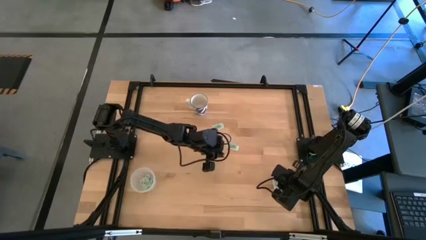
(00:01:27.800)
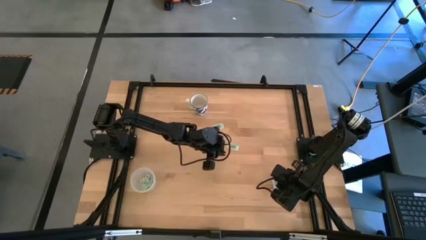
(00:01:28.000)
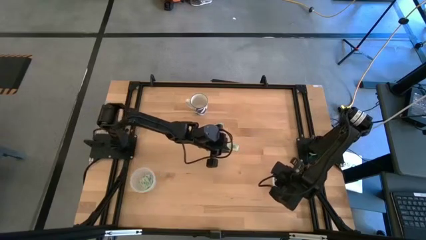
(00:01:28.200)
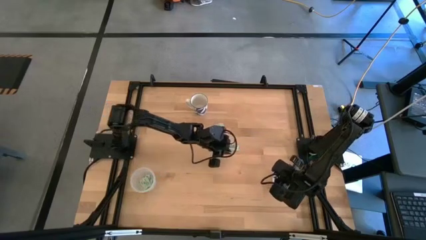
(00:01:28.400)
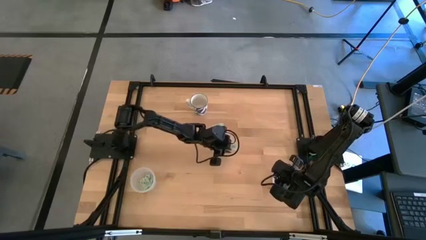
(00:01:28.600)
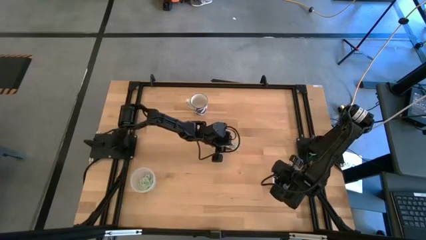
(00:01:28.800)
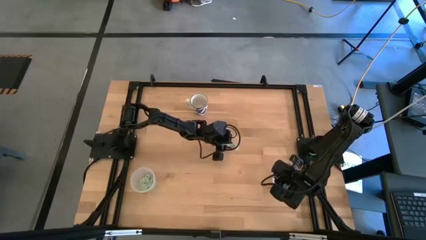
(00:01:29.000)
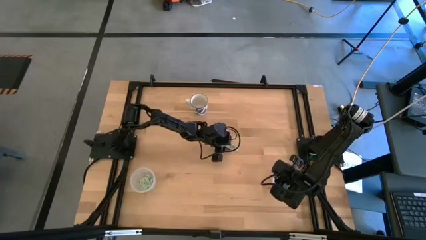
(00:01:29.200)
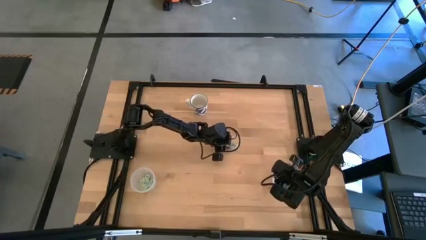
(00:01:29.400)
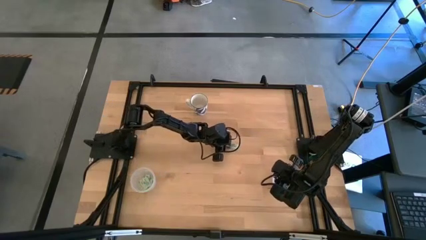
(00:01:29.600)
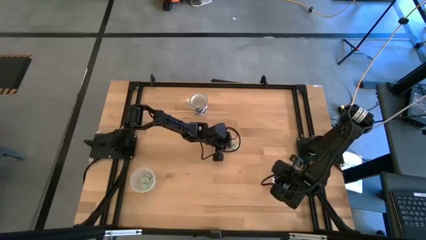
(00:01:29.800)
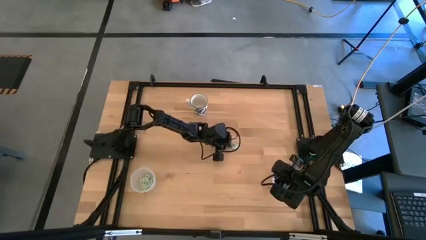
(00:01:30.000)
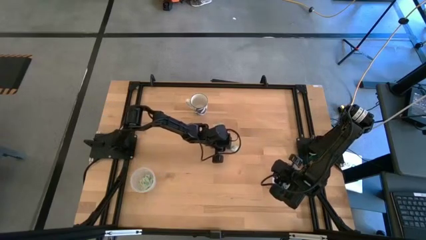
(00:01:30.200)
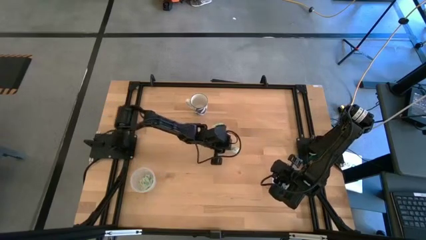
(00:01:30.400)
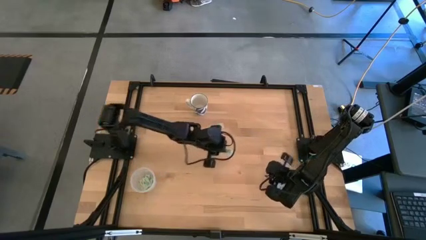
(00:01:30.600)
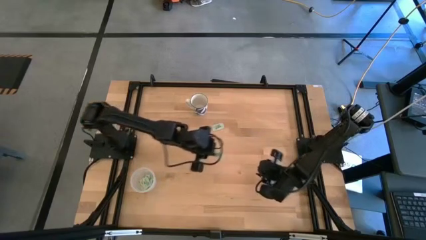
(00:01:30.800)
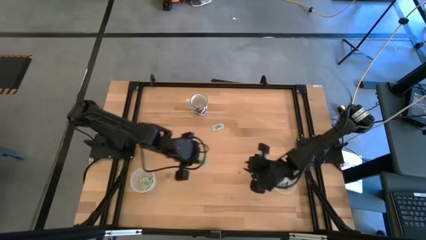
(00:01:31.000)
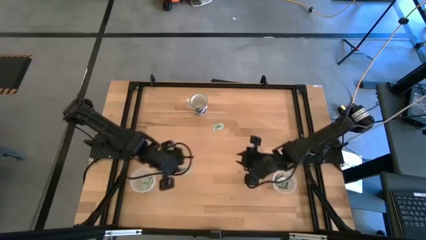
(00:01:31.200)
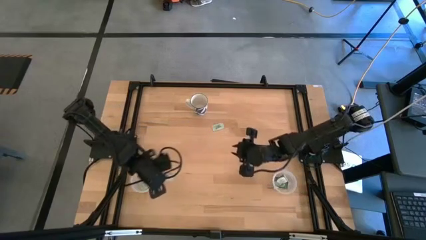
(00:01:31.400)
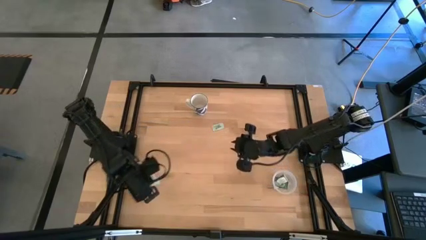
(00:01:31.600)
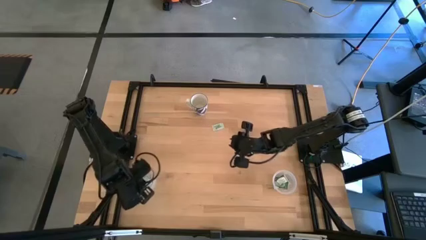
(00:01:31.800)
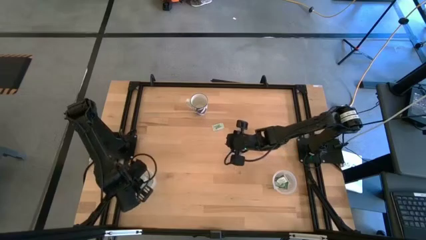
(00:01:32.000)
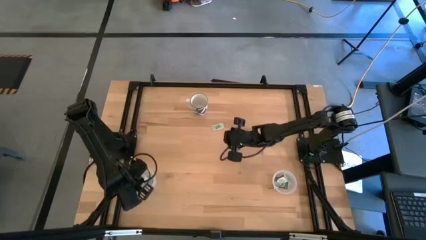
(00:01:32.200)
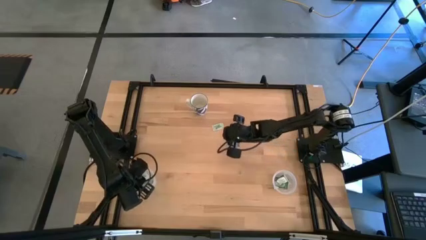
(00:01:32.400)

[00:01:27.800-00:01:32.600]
Task: Pick and place Stevia / Truvia into bins
Put the light green stevia packet into the left transparent container

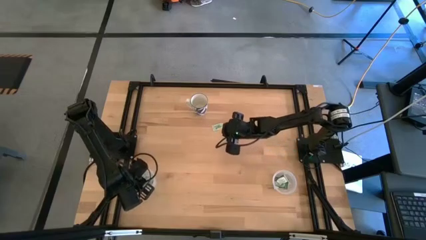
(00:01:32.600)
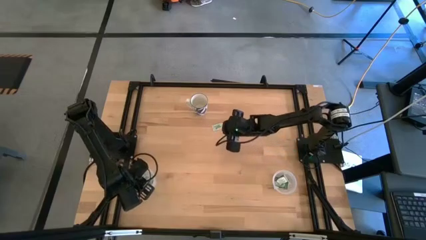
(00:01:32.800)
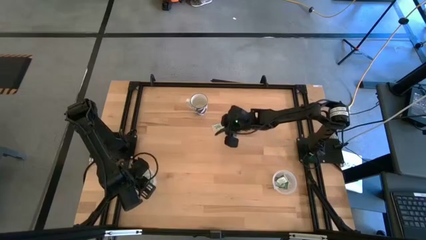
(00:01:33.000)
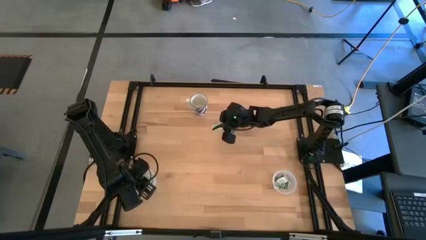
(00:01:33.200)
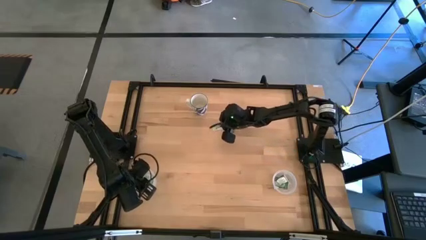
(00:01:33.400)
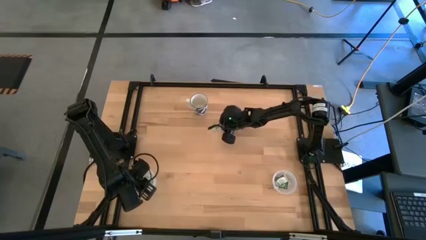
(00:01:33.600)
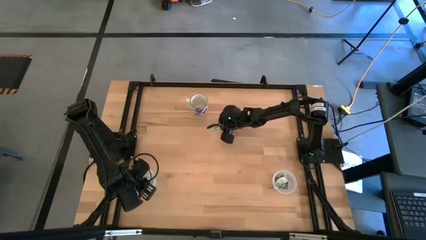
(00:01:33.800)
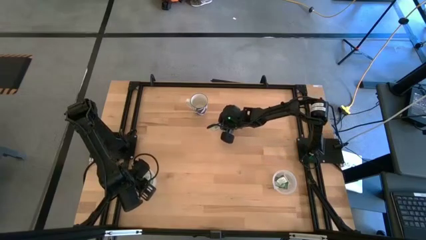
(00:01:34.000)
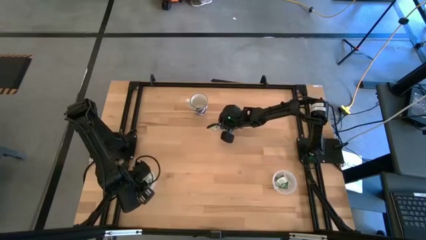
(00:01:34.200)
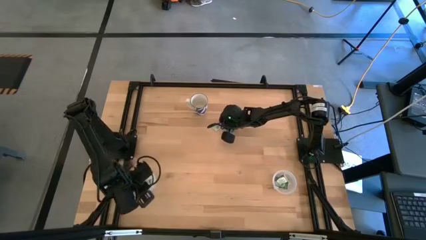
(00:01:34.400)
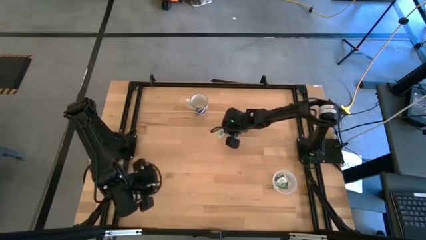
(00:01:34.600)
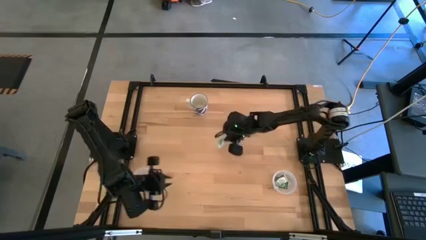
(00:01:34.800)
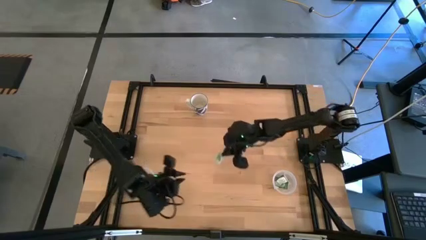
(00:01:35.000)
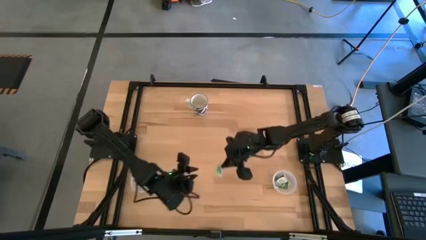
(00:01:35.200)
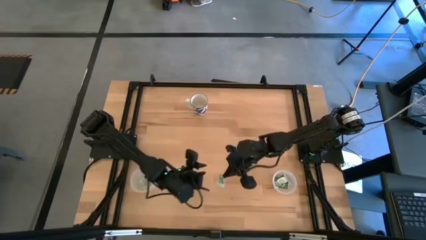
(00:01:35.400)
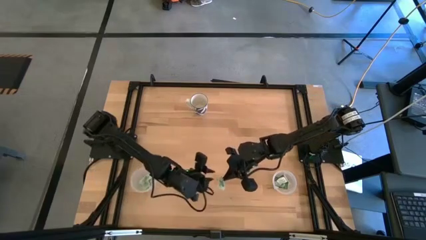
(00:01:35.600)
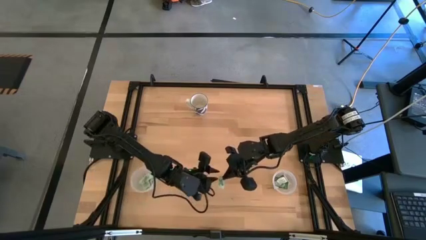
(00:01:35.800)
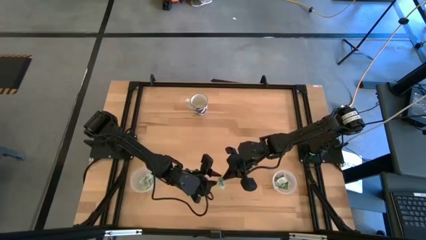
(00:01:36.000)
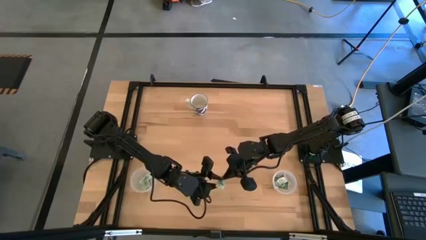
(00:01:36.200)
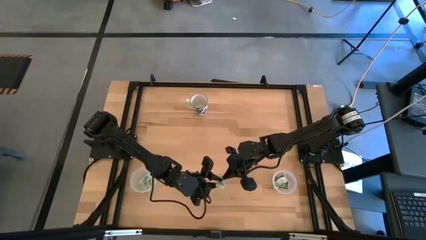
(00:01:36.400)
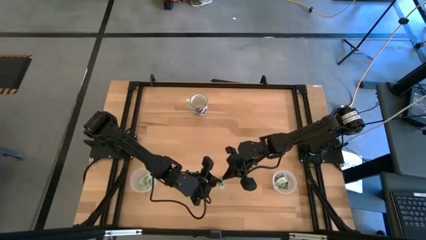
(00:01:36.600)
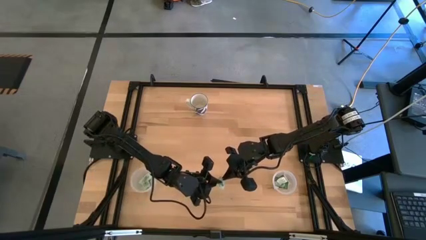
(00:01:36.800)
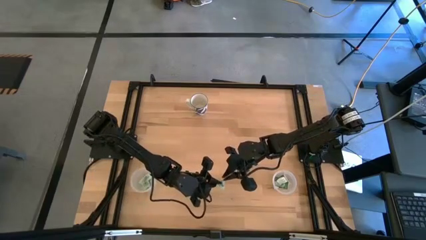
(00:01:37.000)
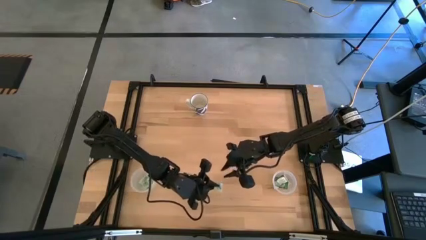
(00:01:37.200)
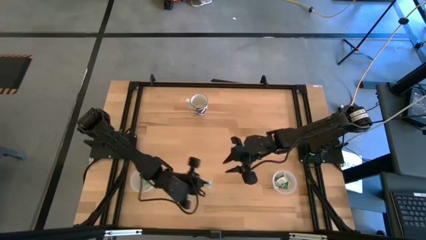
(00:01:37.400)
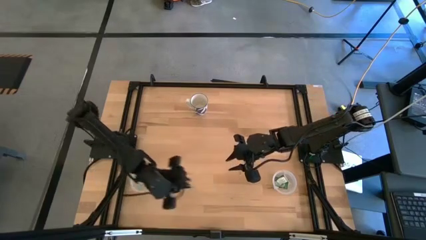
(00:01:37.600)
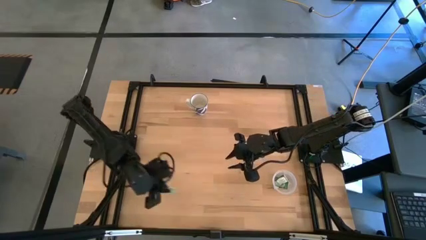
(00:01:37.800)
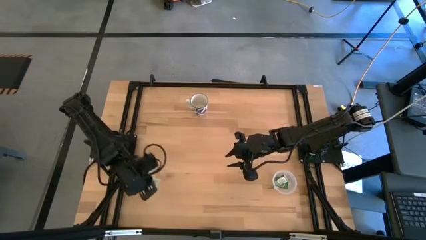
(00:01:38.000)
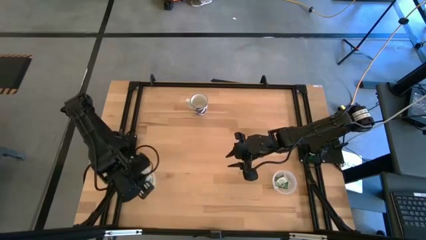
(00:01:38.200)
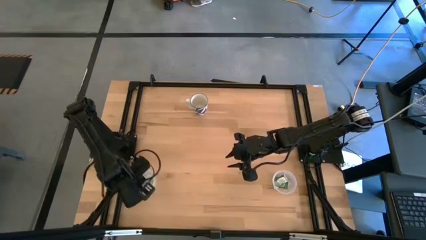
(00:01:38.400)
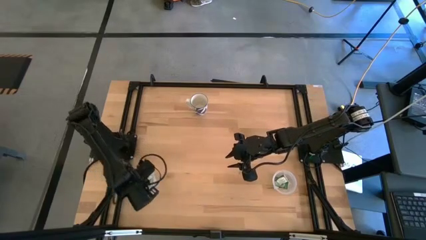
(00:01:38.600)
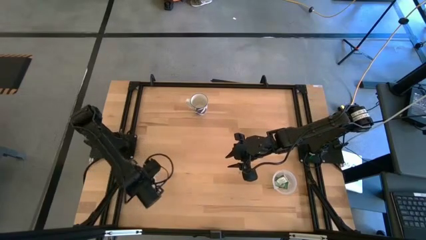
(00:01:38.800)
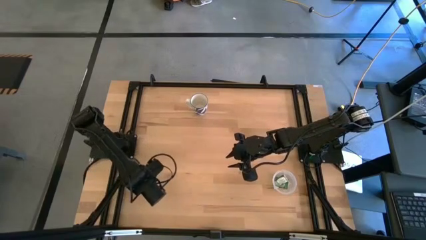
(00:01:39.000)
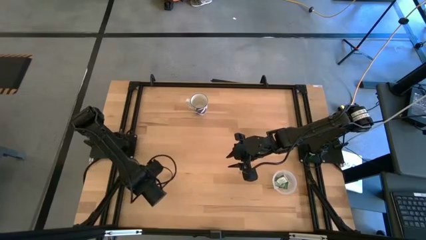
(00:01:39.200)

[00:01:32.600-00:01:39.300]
Put the light green stevia packet into the left transparent container

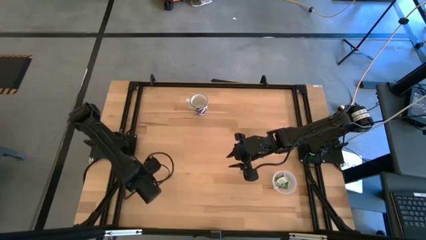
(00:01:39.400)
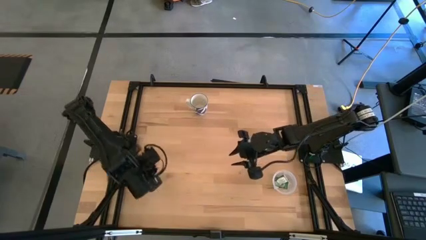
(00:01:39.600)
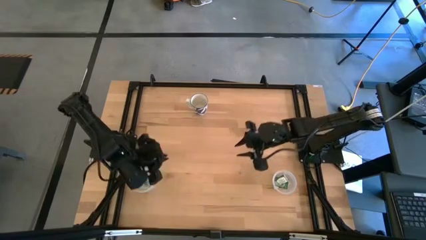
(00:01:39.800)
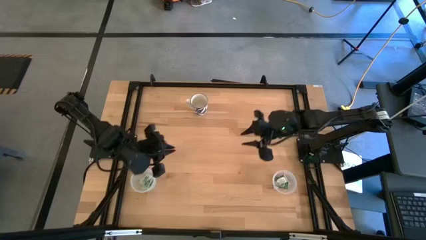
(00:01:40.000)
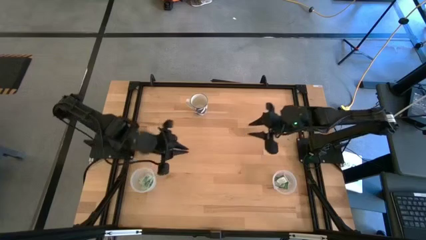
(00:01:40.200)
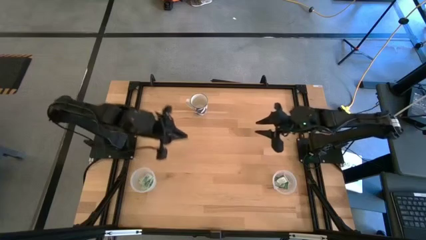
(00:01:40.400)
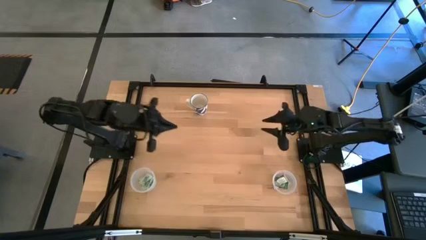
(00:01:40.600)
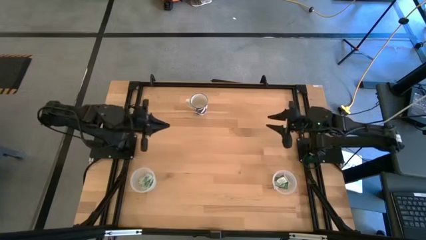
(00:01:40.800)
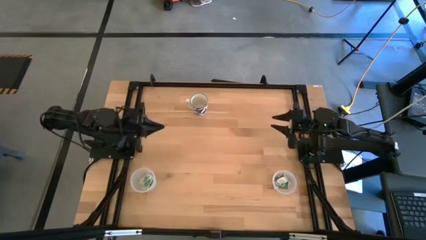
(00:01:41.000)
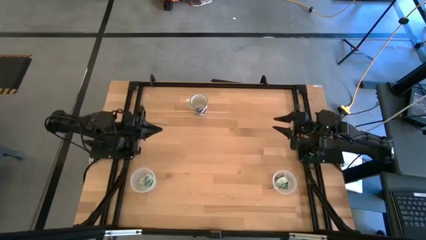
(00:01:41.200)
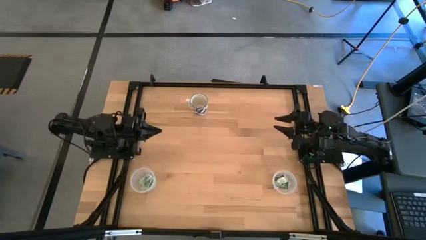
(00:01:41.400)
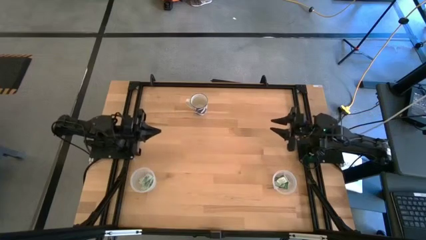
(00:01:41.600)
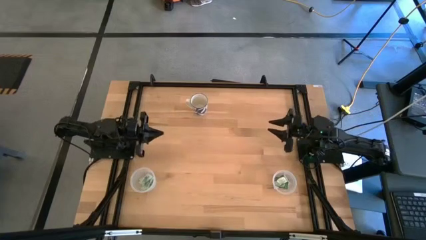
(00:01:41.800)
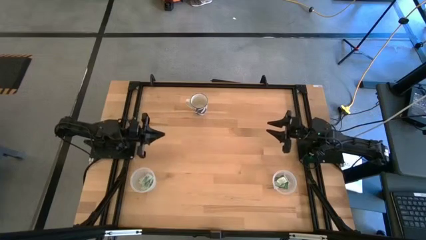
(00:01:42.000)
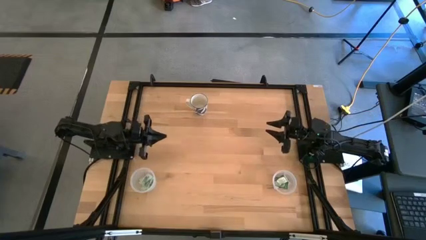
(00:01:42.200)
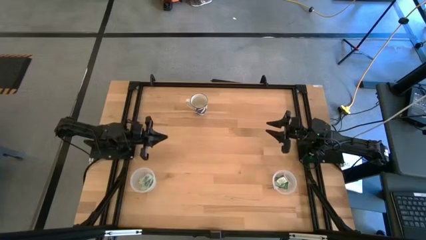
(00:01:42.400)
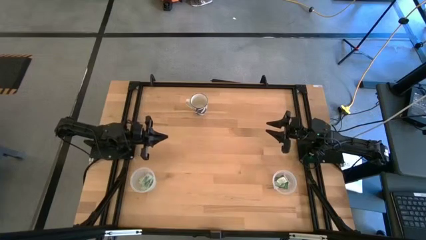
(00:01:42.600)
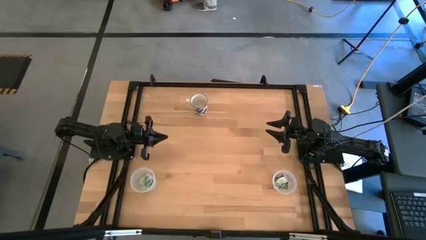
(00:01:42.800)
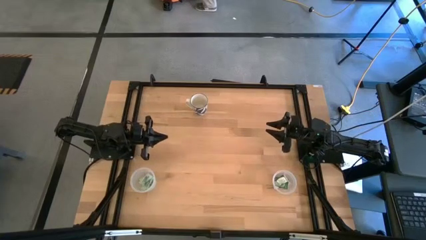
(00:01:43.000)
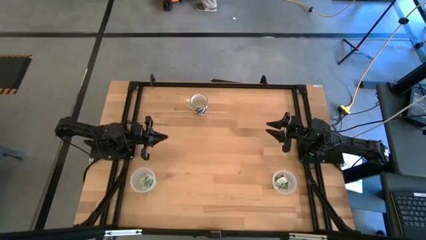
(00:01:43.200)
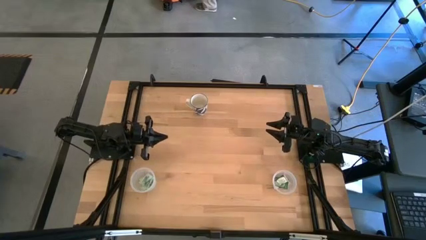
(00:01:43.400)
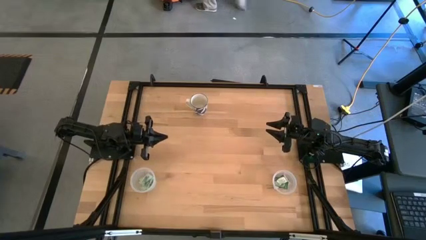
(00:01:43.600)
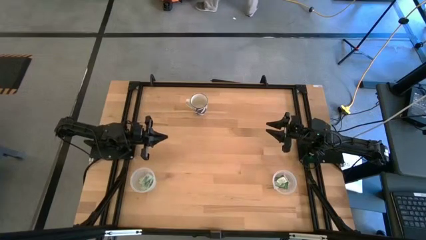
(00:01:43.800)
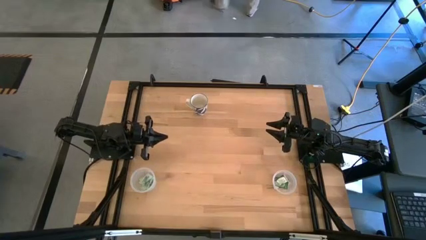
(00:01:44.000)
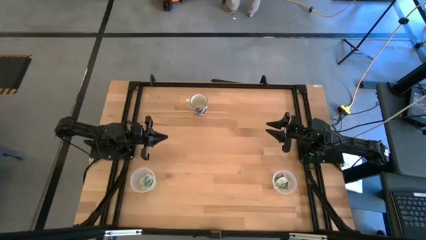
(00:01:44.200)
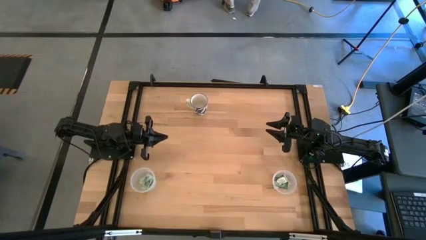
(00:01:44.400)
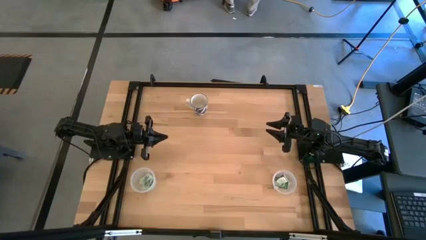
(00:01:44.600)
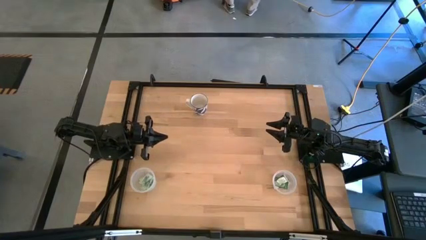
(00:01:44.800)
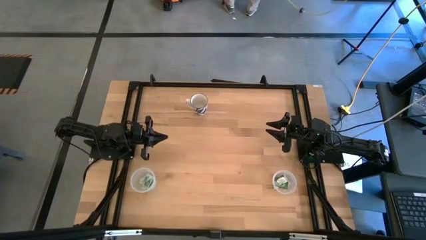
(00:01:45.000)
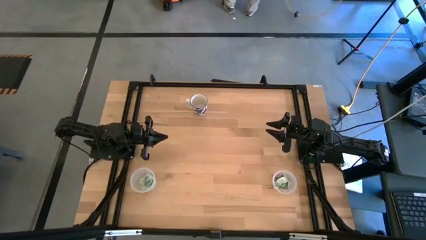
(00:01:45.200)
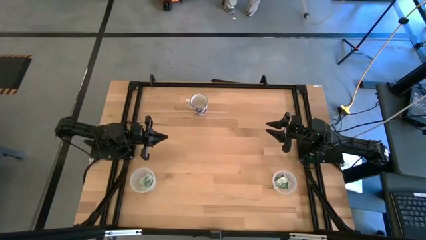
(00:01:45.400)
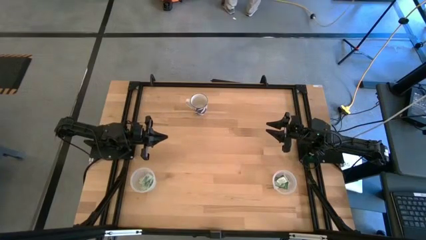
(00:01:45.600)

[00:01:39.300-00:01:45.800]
Return to Home Position
